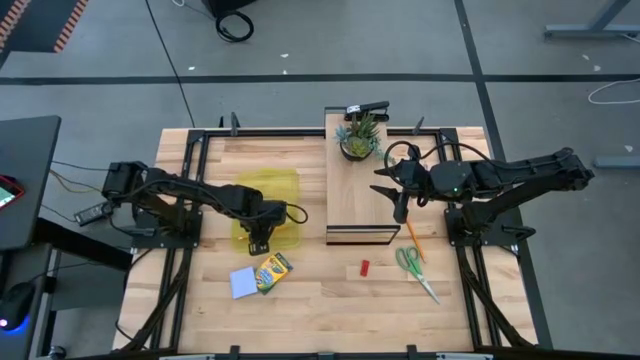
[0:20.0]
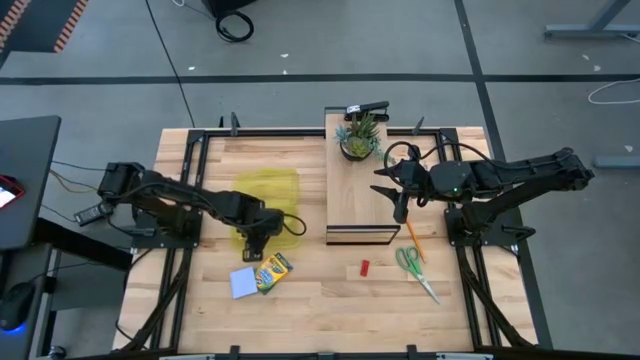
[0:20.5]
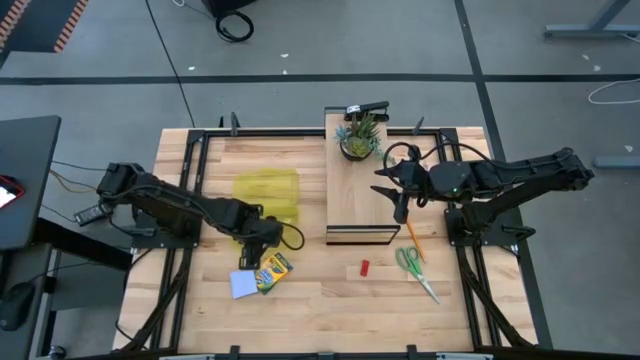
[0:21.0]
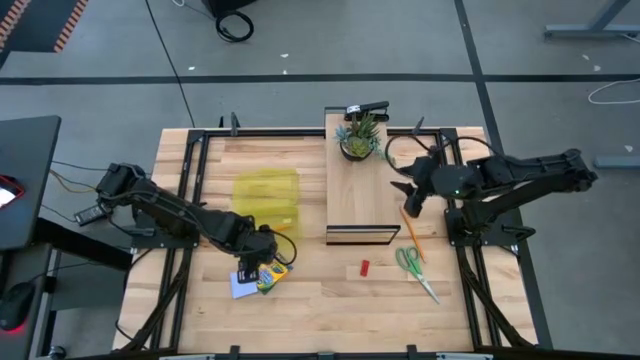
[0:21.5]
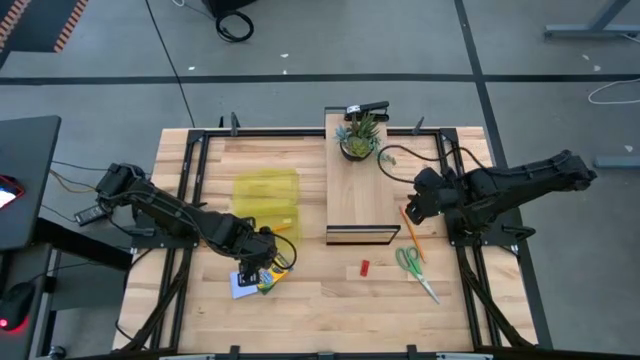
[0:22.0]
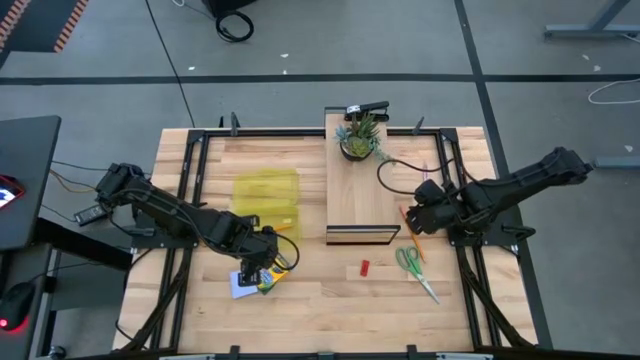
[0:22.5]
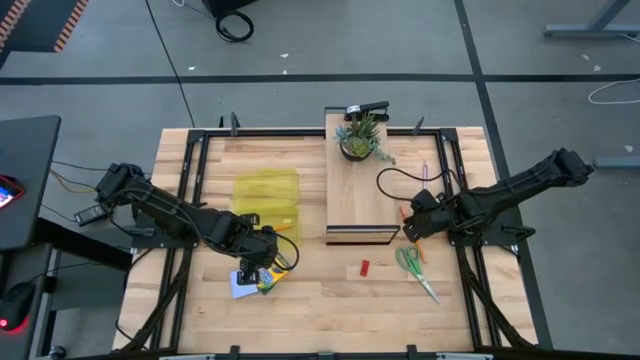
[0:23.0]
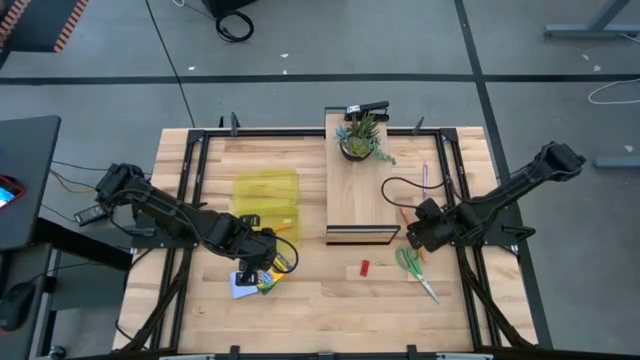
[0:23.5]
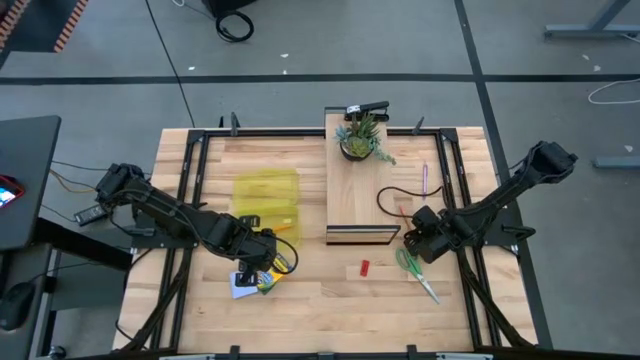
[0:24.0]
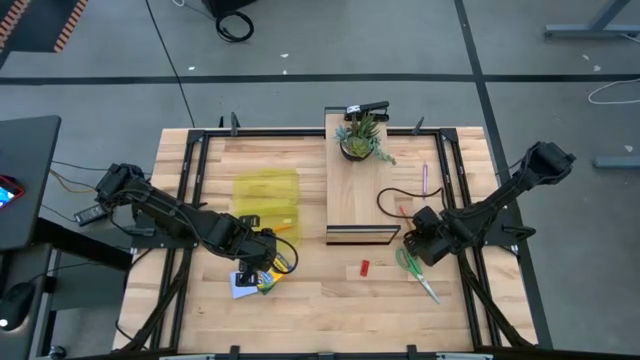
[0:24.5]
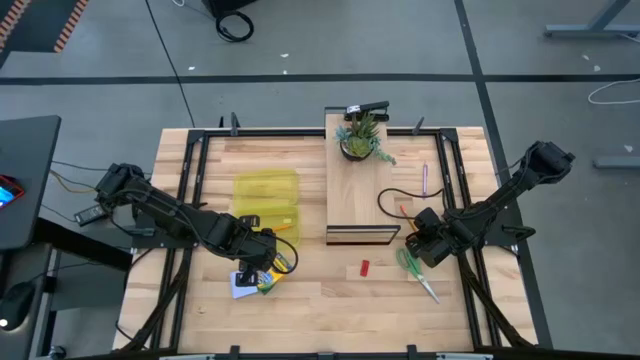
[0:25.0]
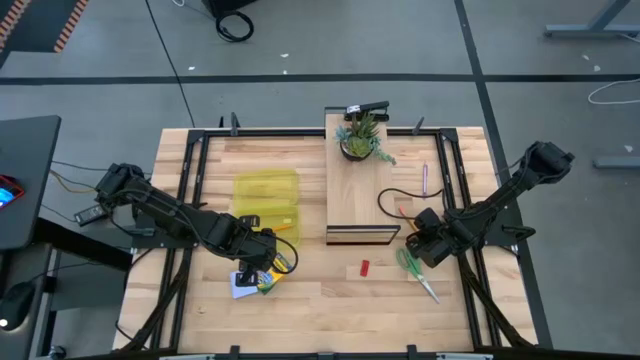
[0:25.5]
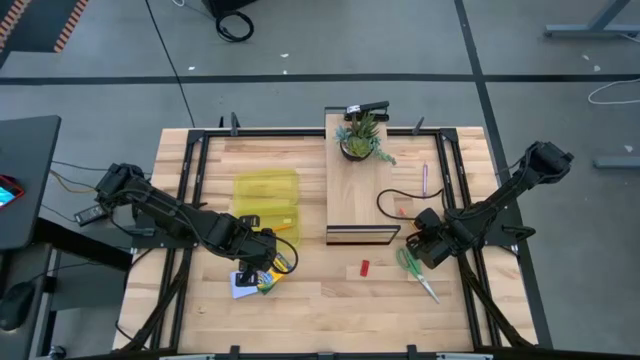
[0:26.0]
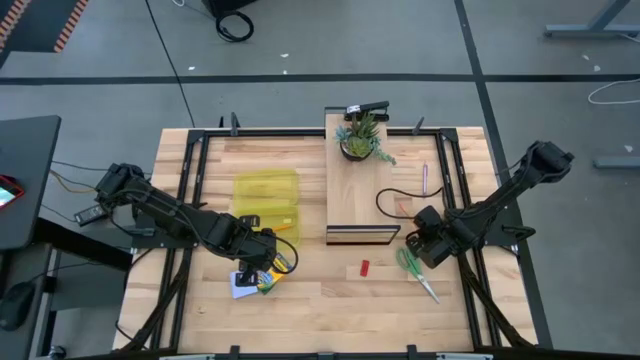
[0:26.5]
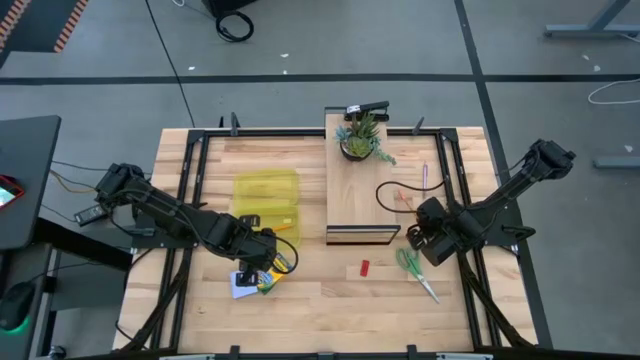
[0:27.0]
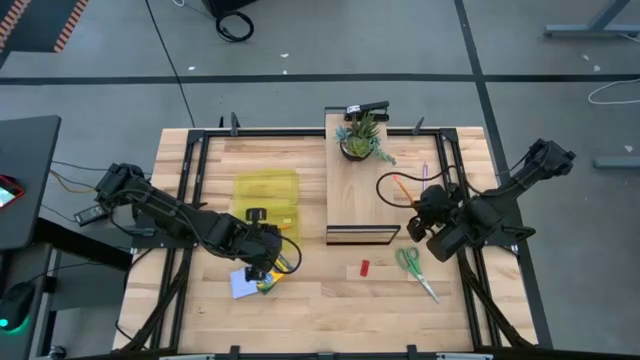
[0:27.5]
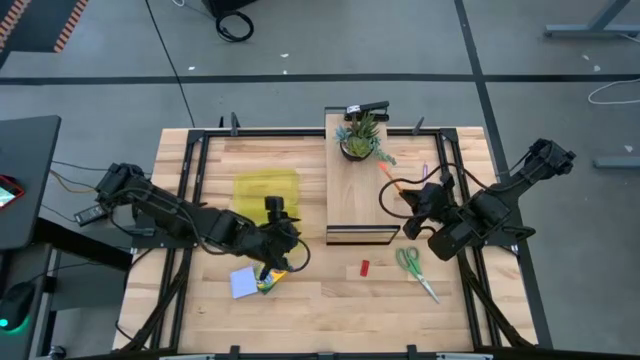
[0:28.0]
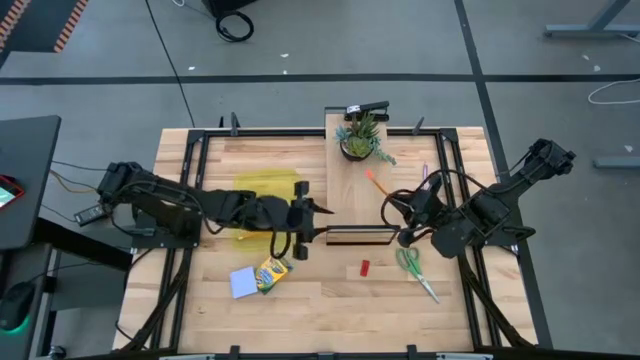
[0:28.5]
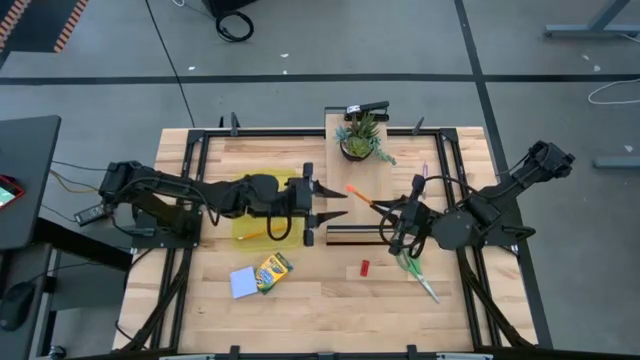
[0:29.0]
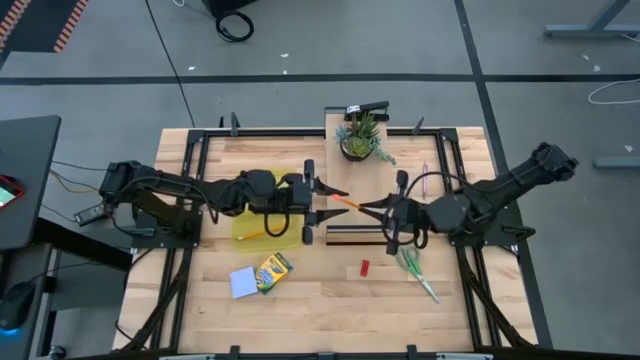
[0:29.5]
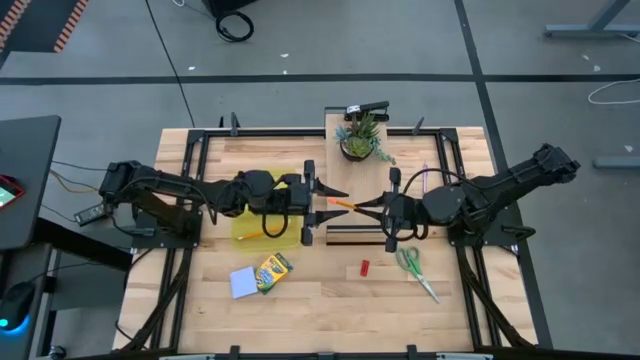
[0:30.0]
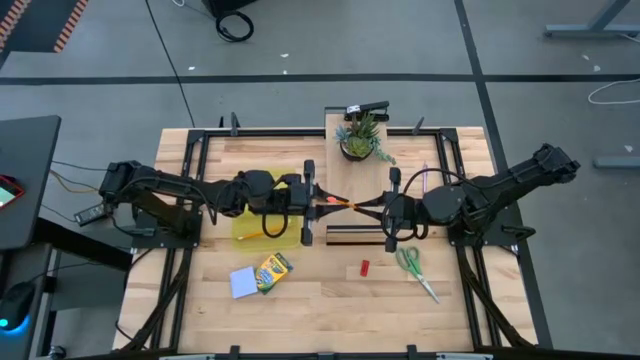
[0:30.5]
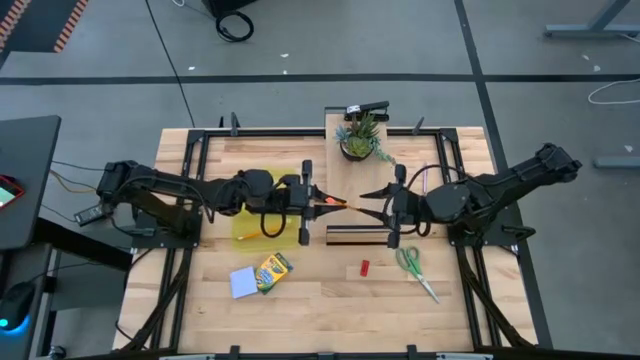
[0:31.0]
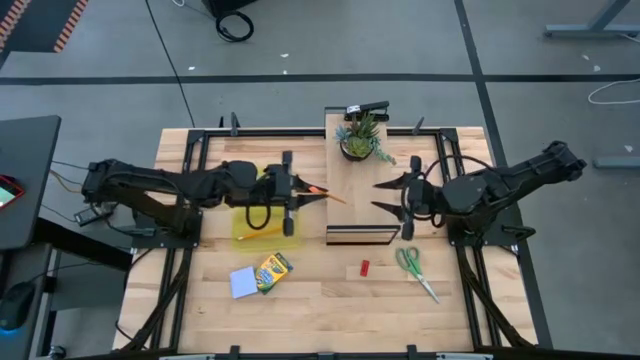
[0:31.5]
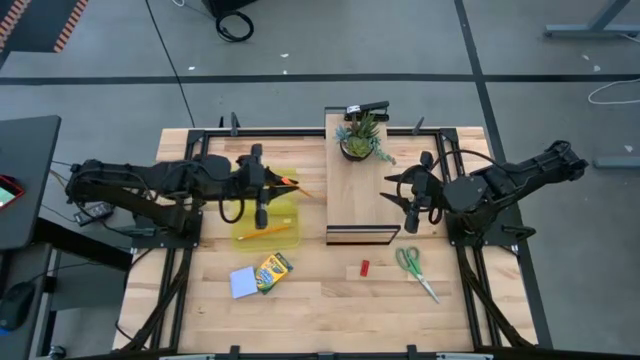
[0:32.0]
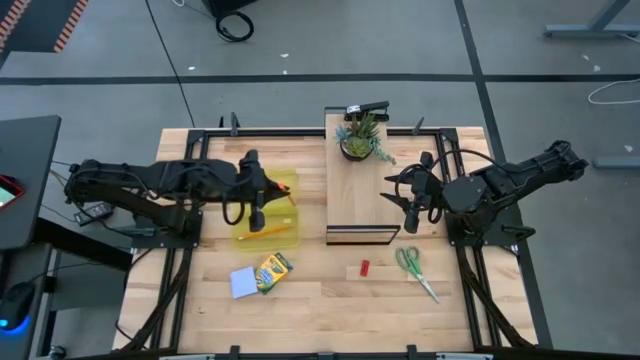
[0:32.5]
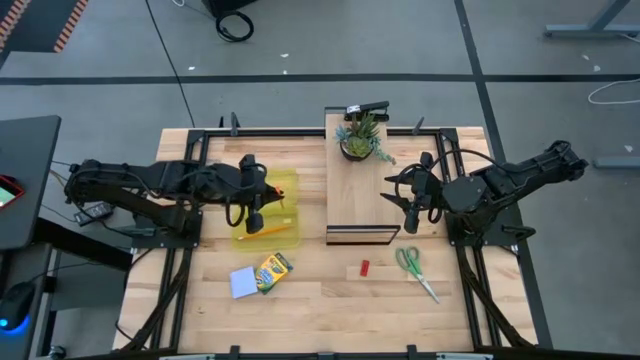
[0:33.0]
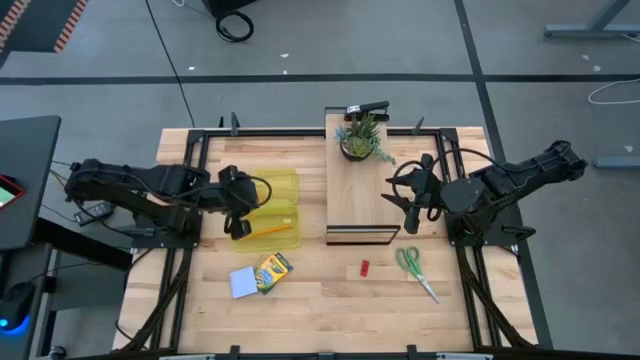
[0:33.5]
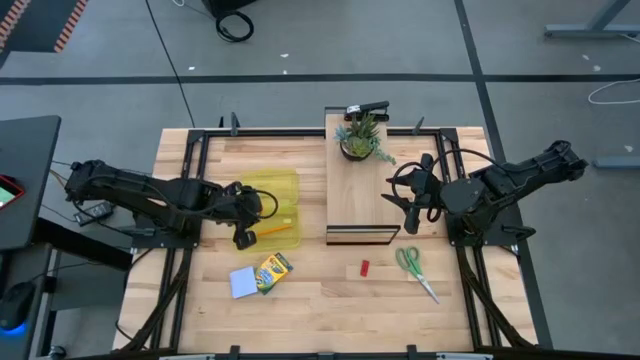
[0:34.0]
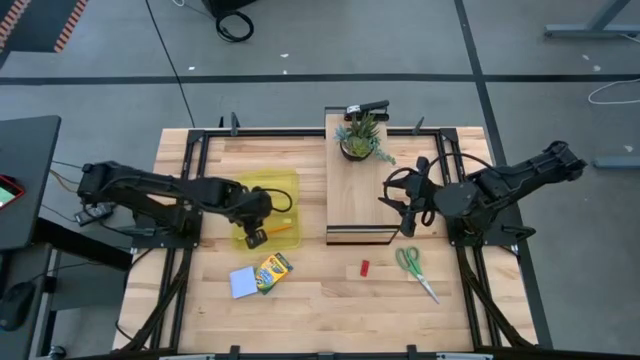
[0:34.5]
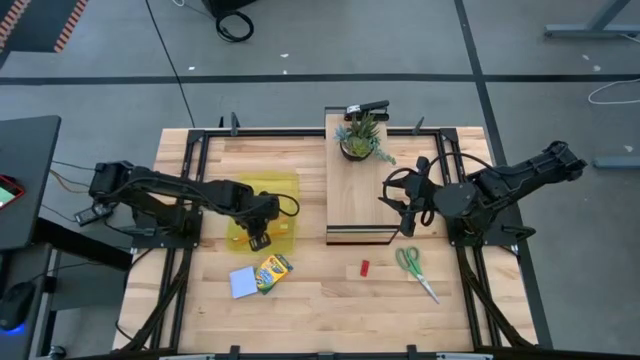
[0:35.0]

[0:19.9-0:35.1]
Task: Pack school essentials
Put the orange pencil into the yellow supply box

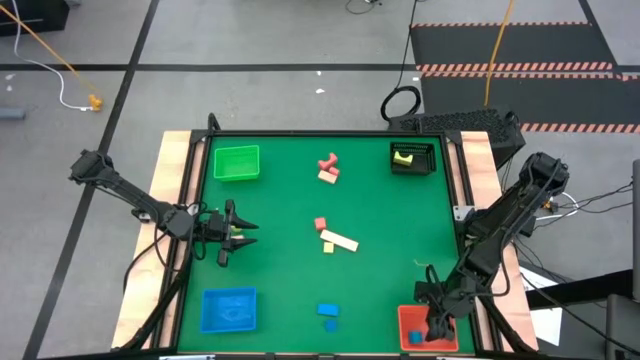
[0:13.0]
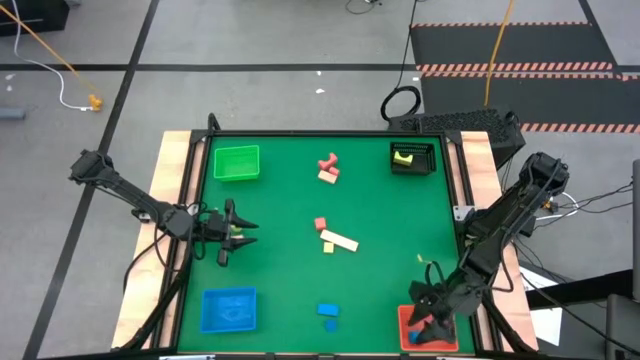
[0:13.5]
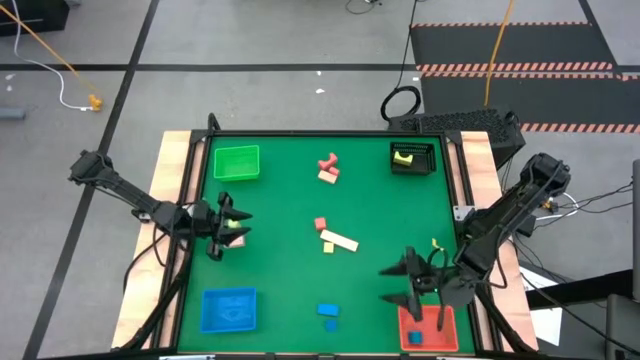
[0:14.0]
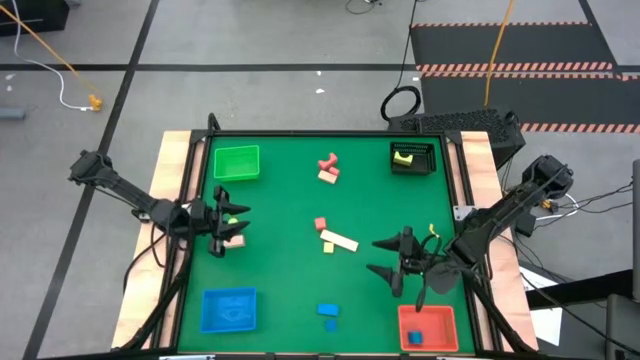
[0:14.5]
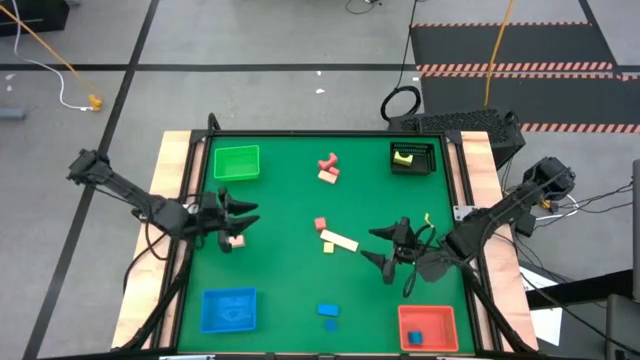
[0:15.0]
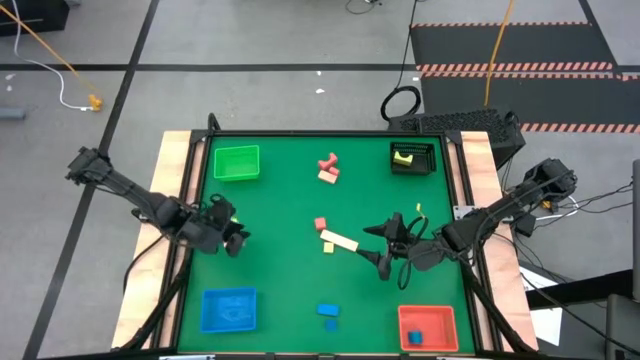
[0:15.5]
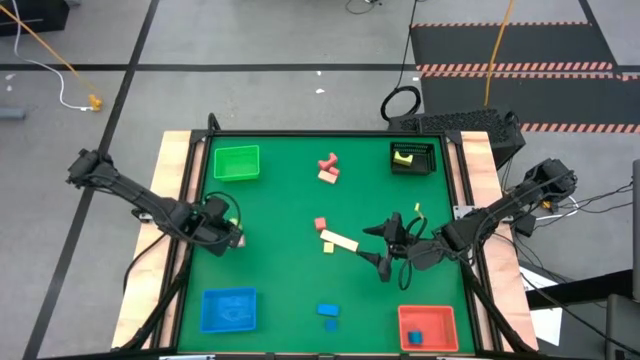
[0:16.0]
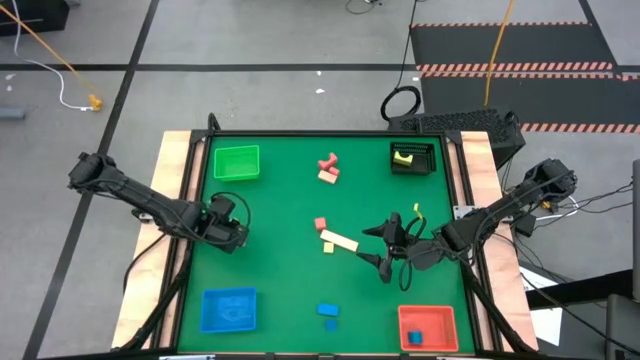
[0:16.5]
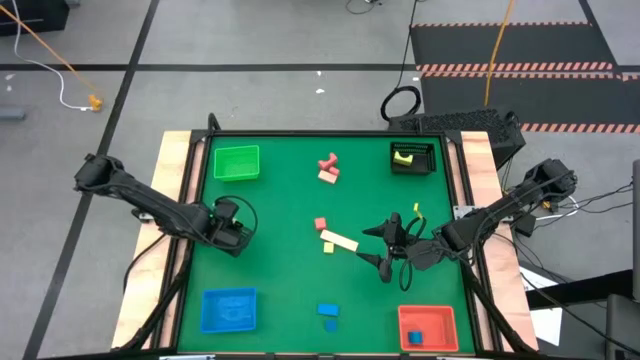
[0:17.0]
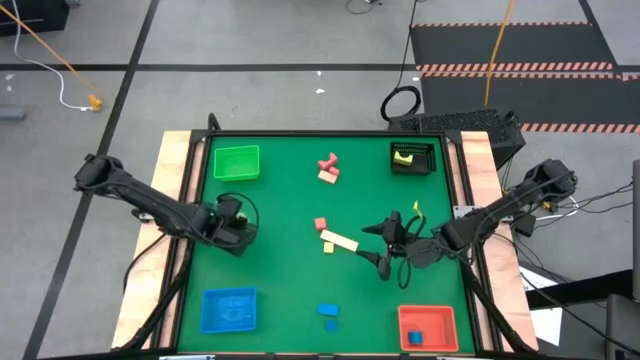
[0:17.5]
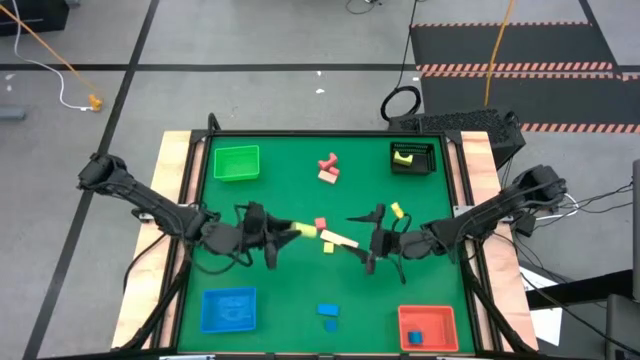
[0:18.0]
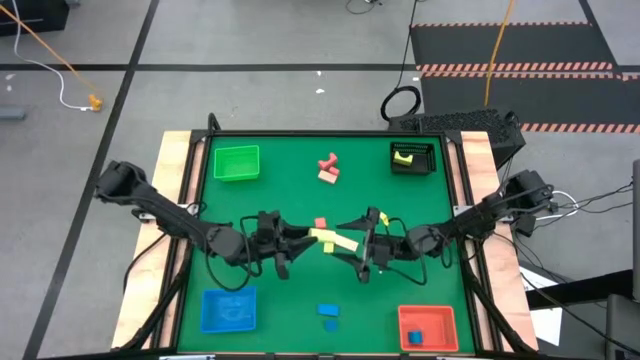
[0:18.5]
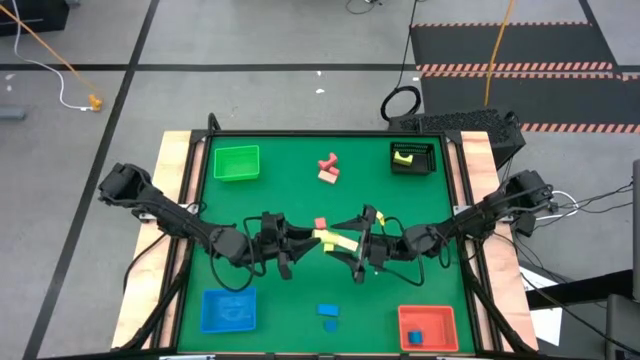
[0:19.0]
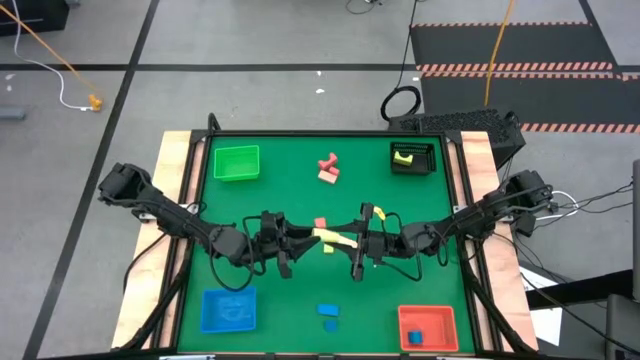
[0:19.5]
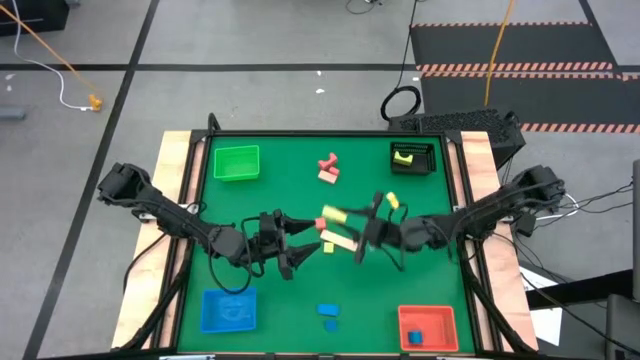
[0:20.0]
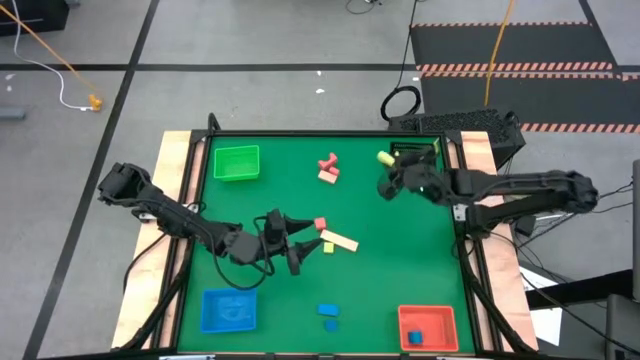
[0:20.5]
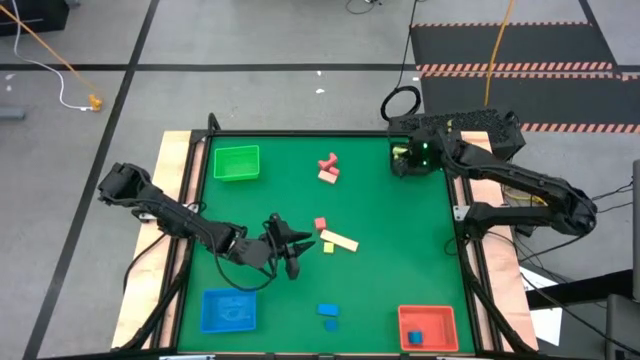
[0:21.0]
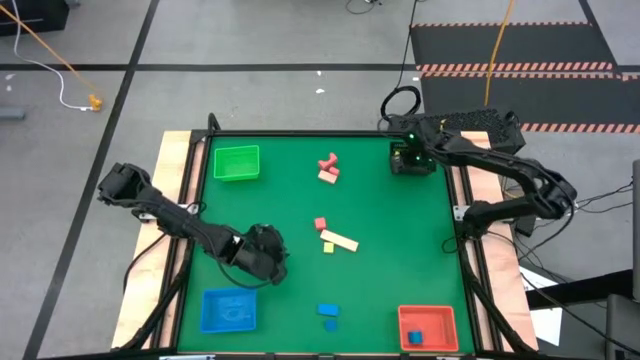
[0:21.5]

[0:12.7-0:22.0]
Task: Sort & place blocks by color
Put the left green block into the black bin
